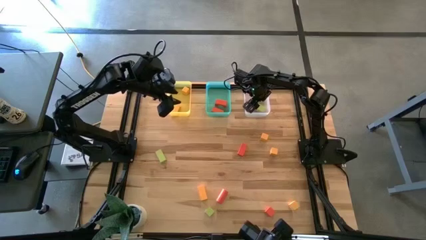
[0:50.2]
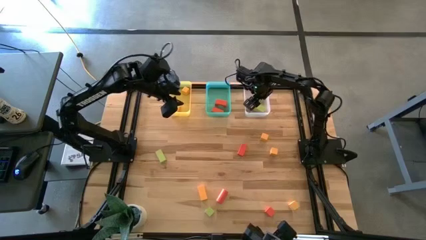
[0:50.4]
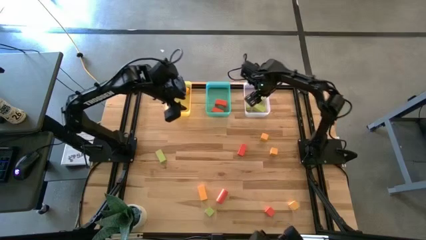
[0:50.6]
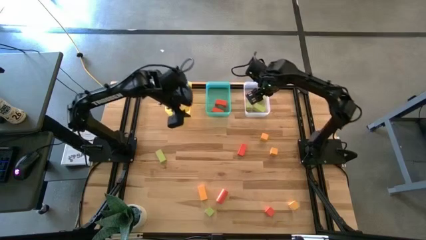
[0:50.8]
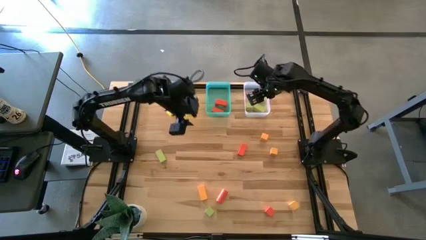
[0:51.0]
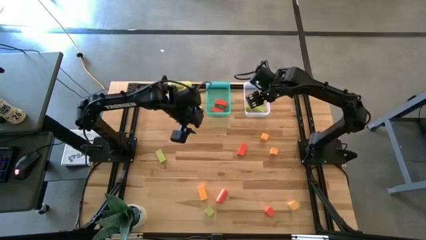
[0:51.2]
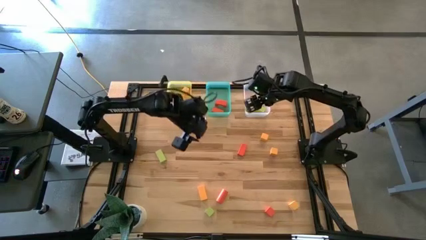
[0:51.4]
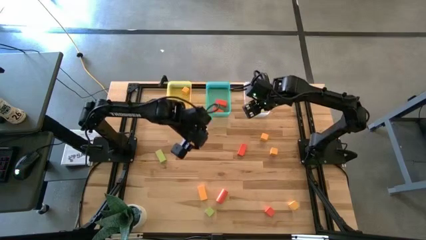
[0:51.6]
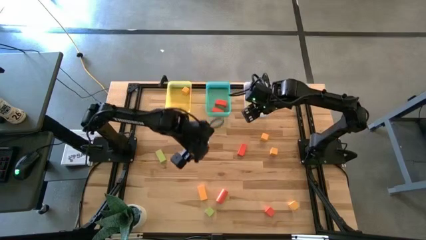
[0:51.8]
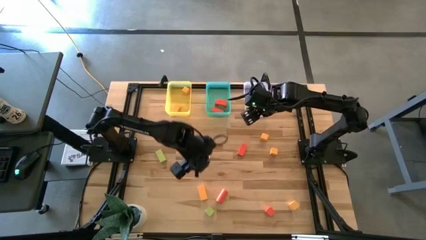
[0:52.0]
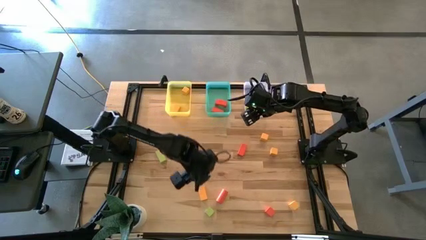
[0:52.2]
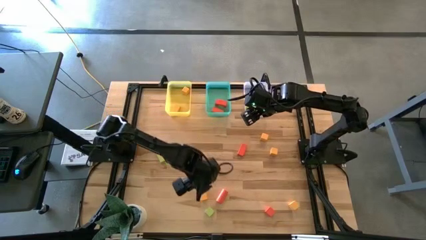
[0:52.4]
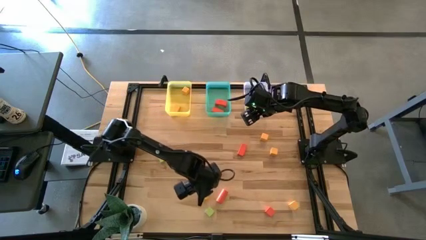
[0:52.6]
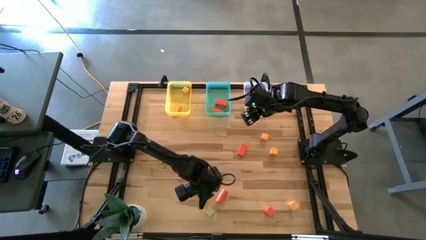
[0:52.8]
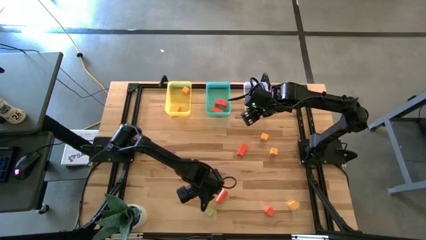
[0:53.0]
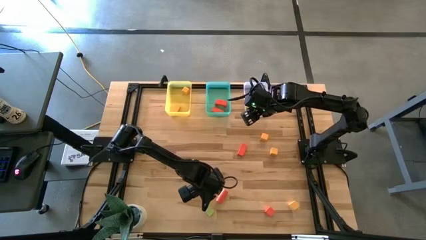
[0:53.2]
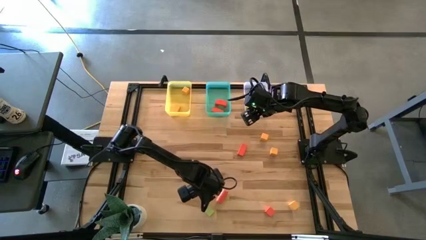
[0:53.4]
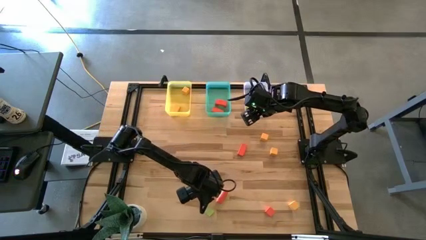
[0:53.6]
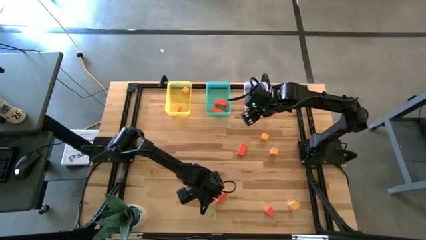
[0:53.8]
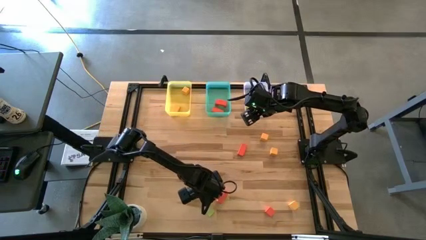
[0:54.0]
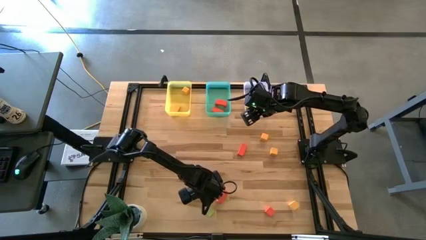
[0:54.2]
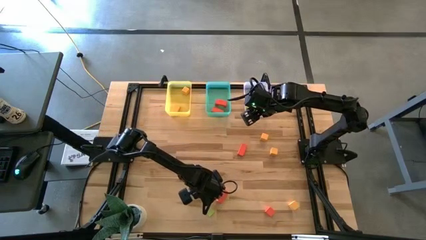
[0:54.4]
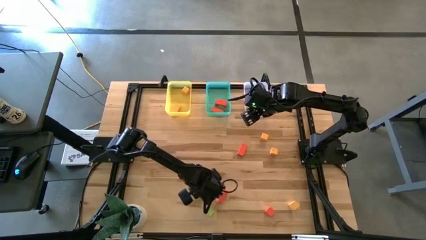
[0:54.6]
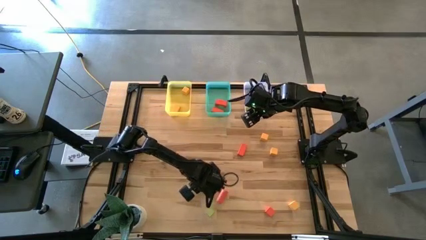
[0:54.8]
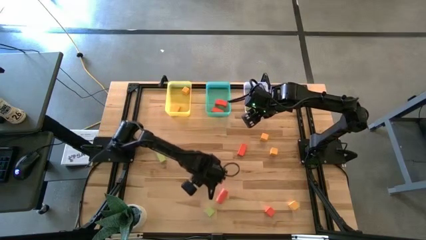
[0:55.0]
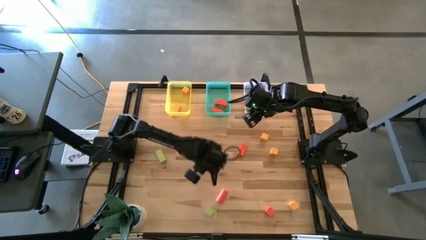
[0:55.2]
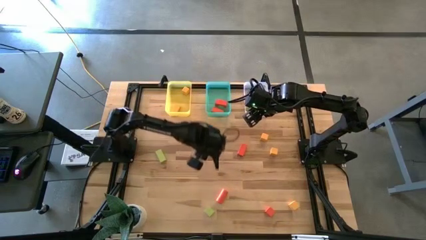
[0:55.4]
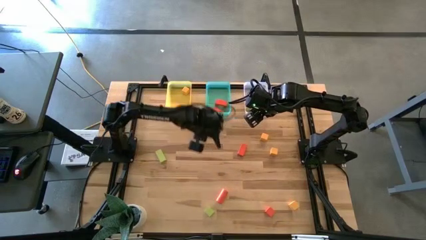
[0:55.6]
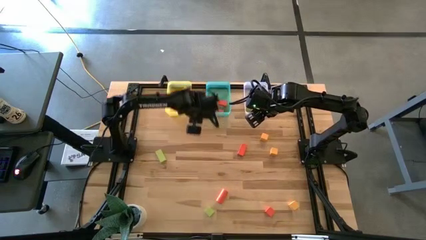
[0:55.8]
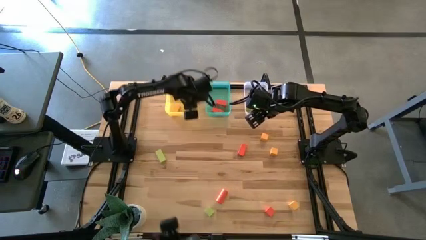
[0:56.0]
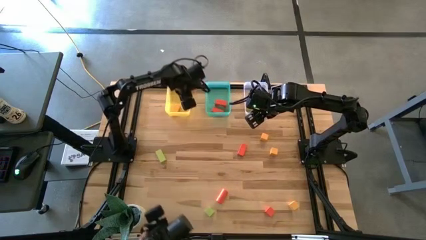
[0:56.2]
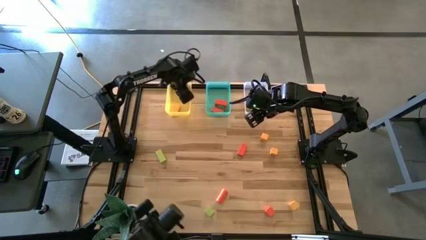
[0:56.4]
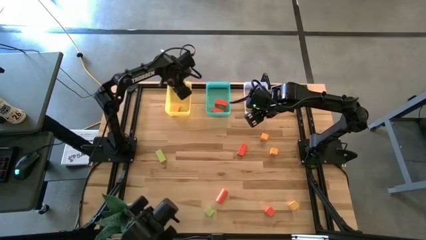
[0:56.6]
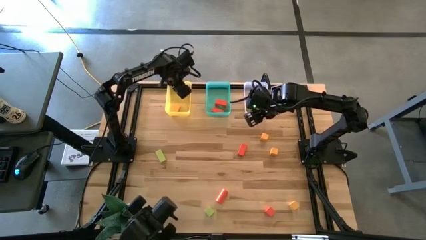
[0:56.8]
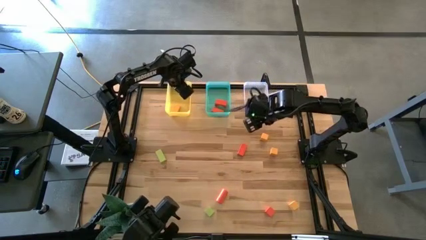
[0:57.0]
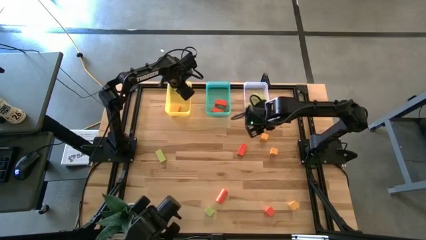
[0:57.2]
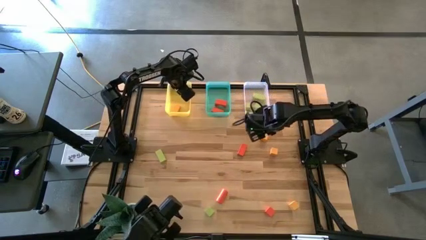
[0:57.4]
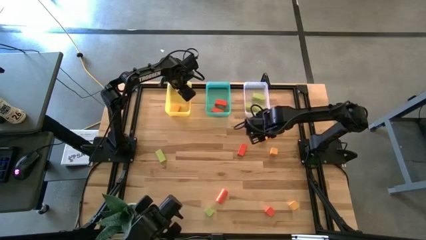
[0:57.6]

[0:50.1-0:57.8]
Task: Sort & place blocks by color
Put the yellow block into the yellow bin

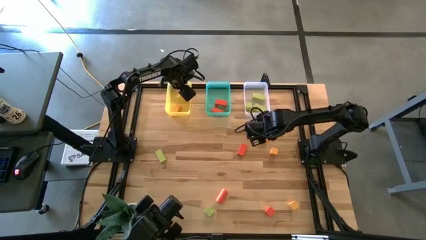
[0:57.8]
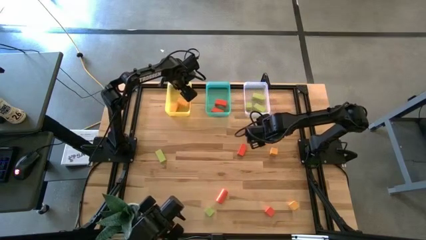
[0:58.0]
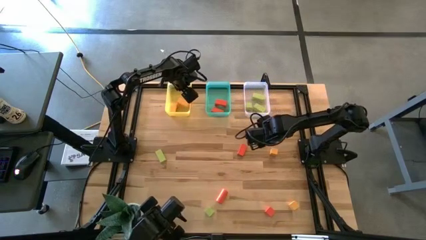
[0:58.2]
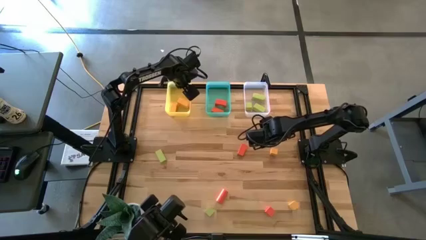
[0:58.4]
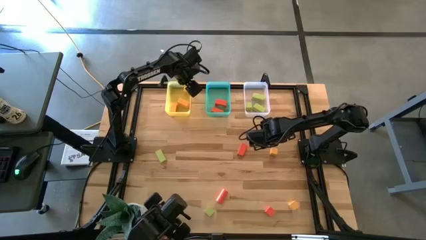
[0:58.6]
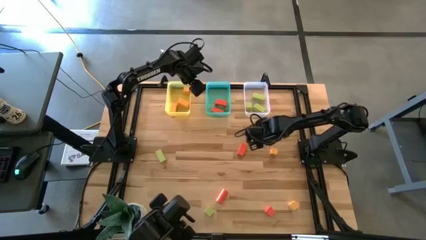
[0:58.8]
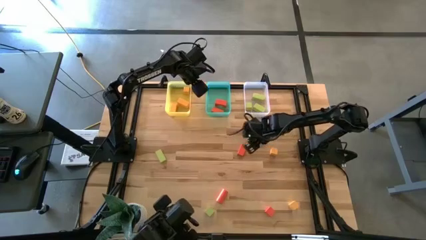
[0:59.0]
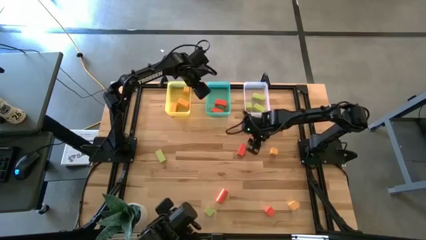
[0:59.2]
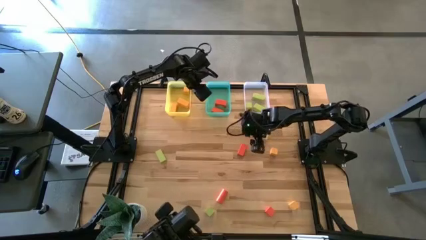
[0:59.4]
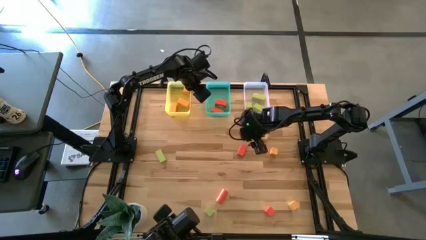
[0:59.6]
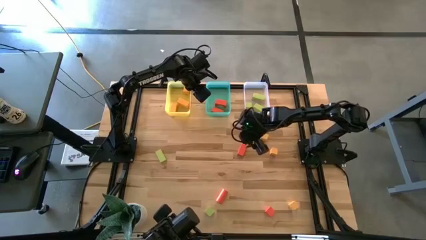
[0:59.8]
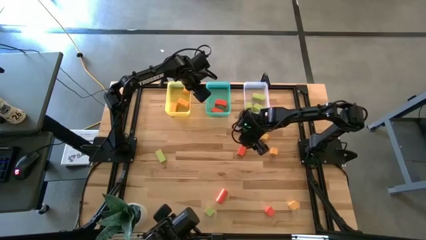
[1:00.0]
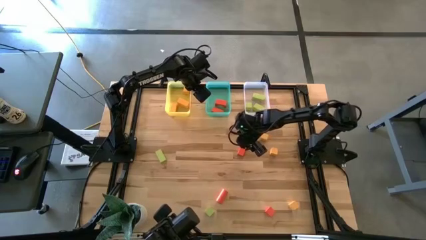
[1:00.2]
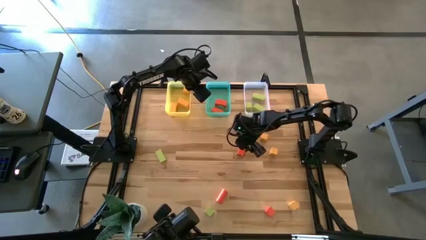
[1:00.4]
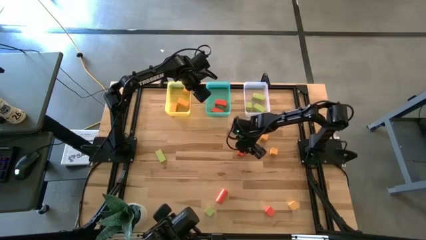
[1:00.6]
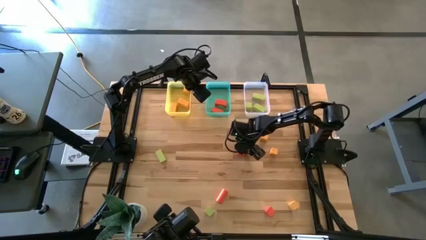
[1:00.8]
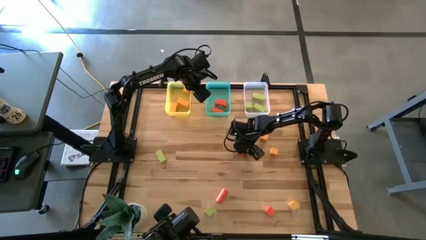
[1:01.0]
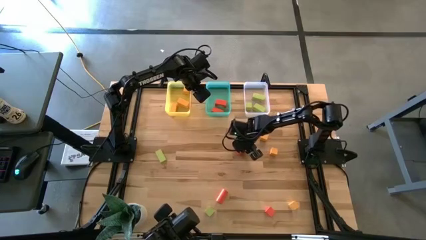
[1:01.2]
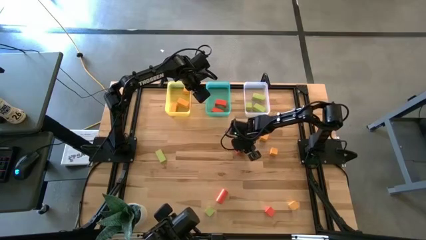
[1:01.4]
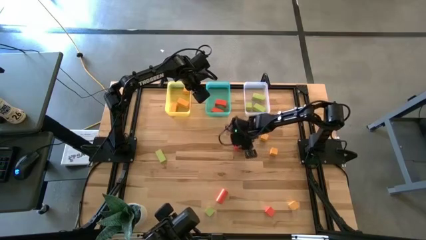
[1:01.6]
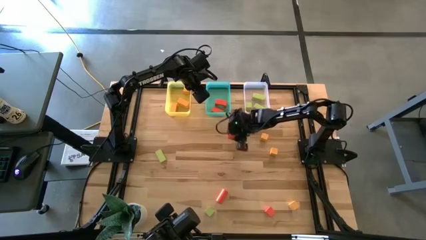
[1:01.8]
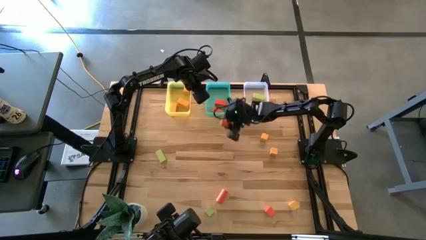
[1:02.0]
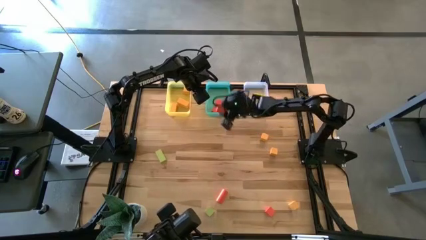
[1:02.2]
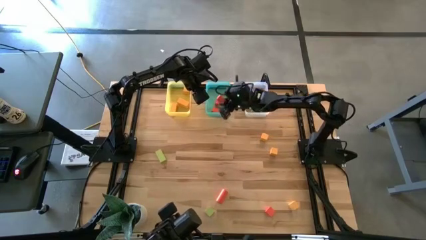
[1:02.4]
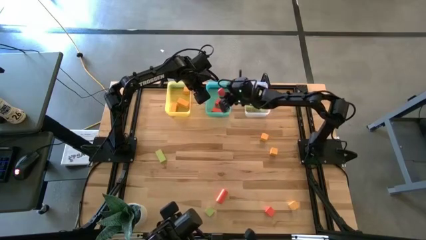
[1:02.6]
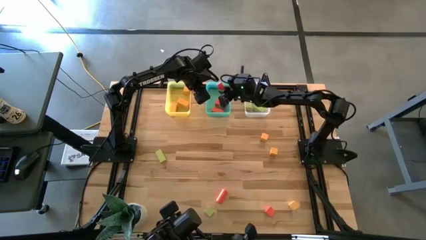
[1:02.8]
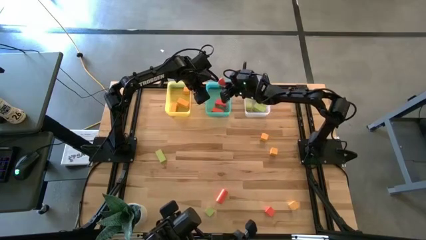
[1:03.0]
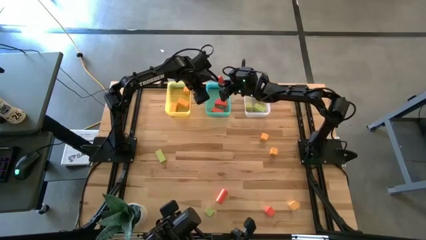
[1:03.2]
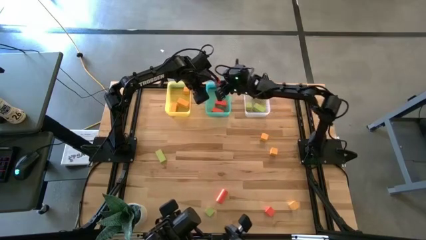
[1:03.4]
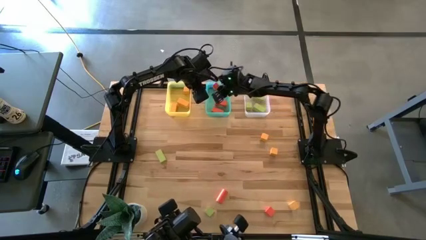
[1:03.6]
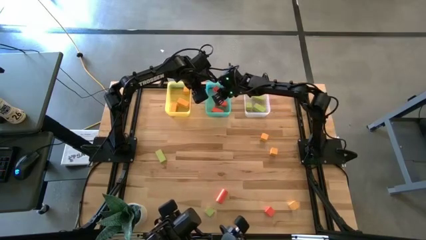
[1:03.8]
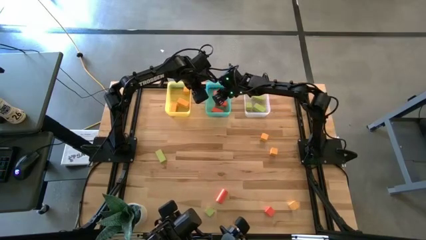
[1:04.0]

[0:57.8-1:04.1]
Put the orange block into the green bin
